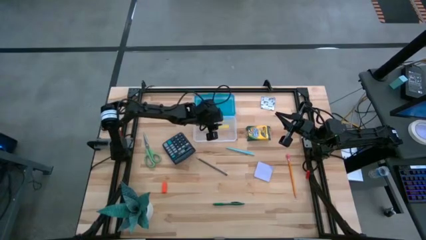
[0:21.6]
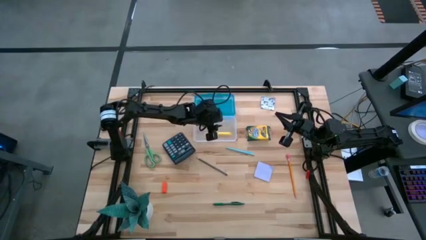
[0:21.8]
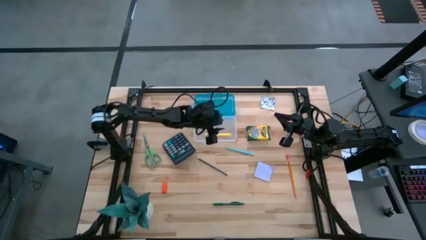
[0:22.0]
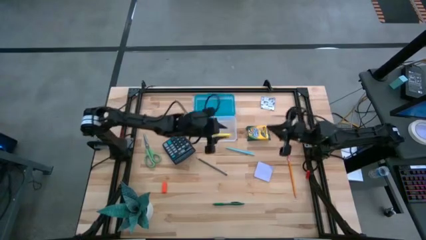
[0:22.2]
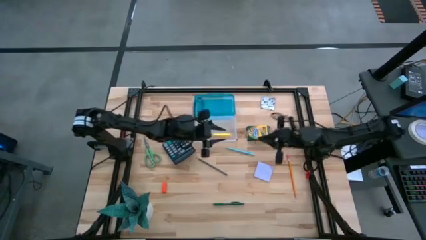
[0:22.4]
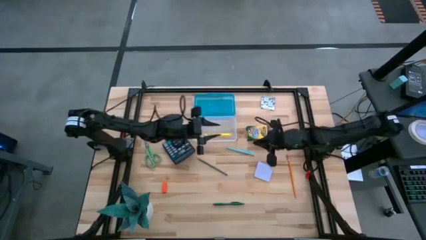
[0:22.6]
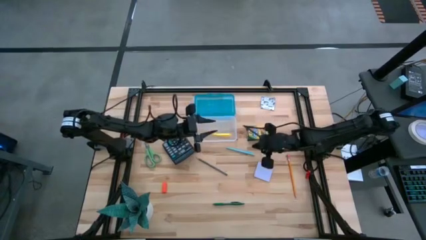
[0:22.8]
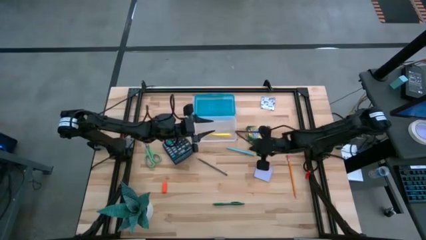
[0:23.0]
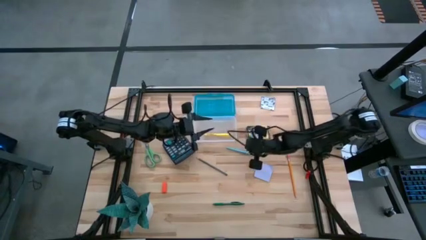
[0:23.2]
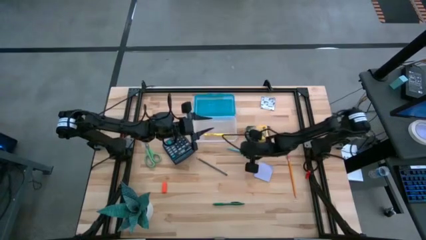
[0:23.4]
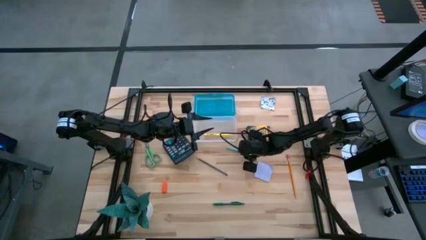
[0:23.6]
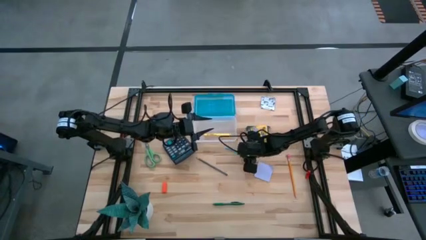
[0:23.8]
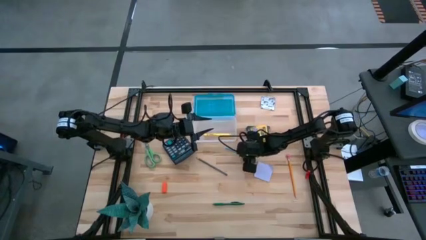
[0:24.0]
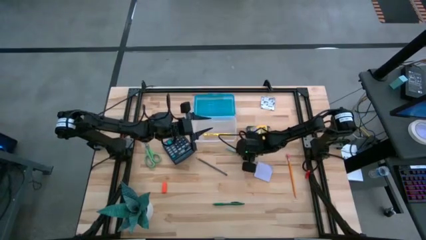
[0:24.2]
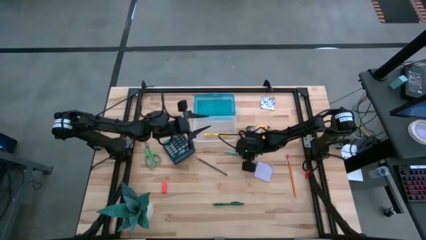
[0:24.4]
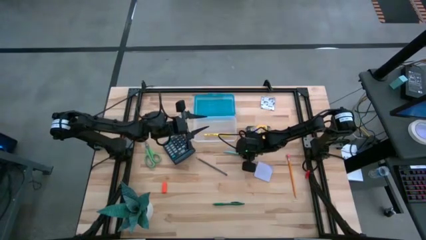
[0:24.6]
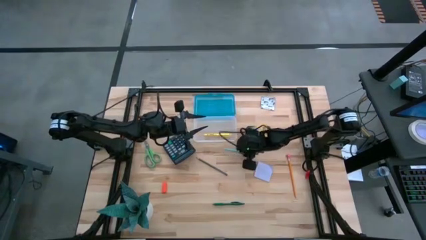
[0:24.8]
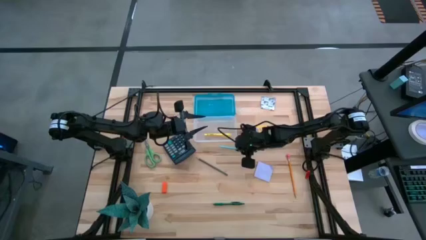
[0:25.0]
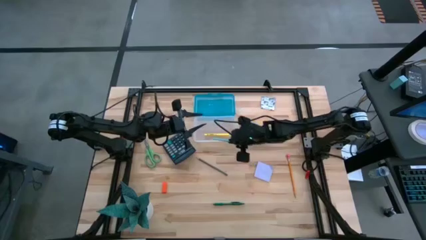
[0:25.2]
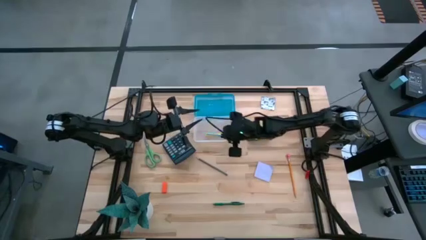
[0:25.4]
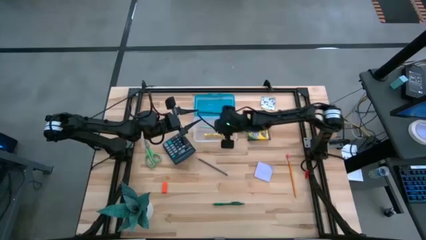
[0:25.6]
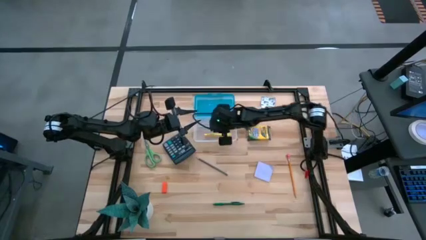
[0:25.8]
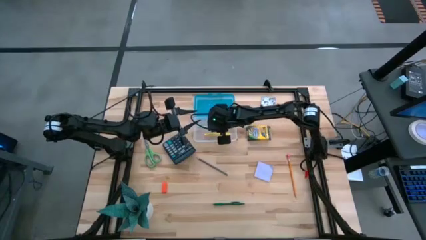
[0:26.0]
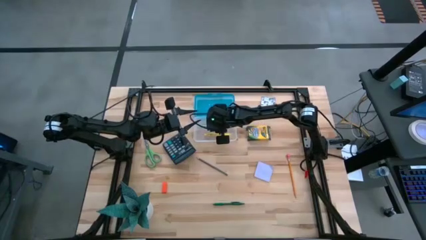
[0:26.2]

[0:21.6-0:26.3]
Task: Pack school essentials
Put the light blue pen into the blue supply box

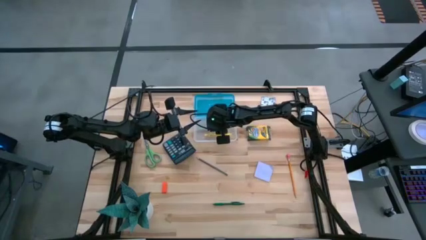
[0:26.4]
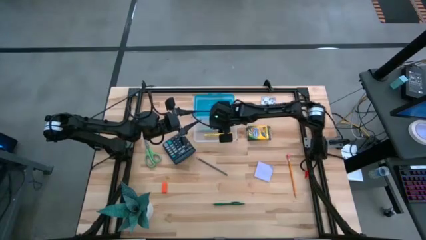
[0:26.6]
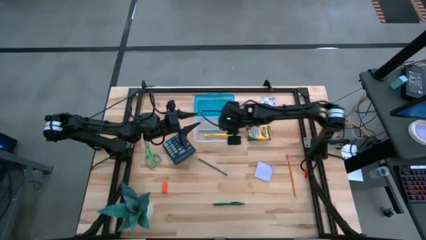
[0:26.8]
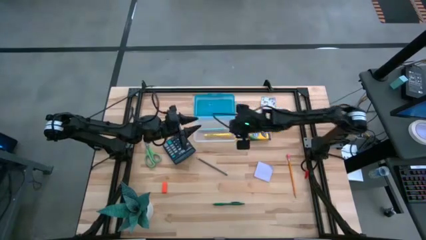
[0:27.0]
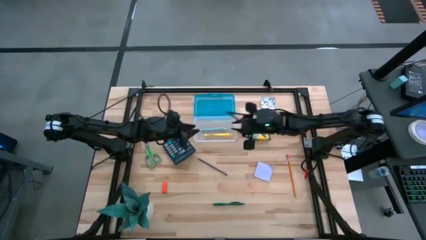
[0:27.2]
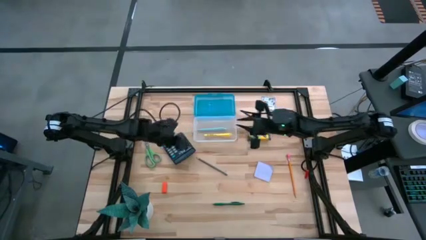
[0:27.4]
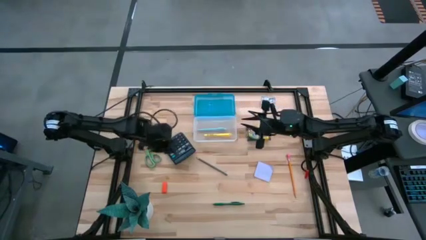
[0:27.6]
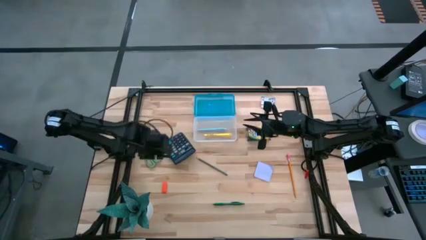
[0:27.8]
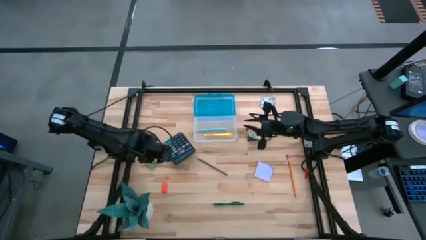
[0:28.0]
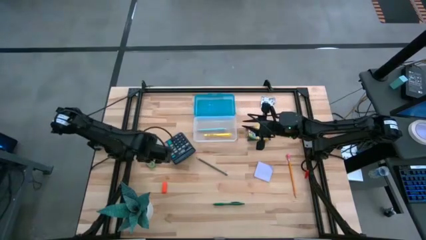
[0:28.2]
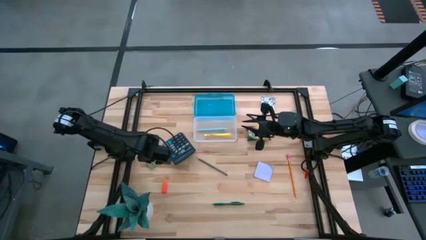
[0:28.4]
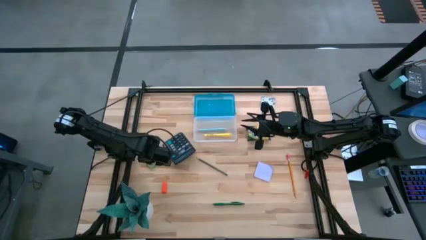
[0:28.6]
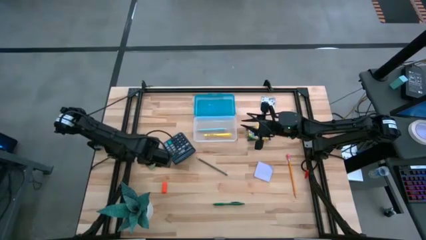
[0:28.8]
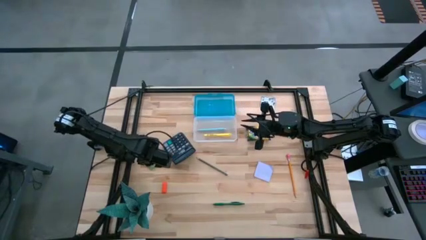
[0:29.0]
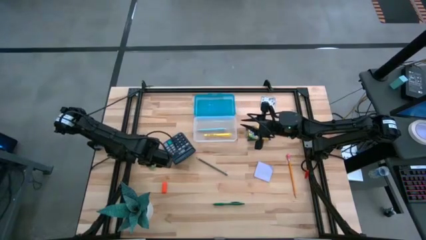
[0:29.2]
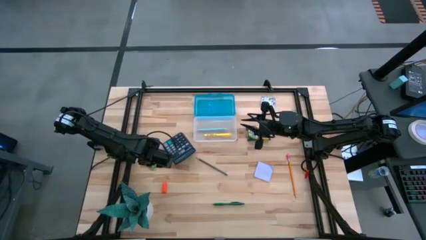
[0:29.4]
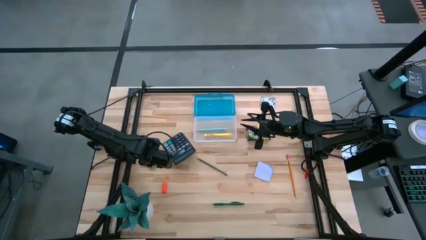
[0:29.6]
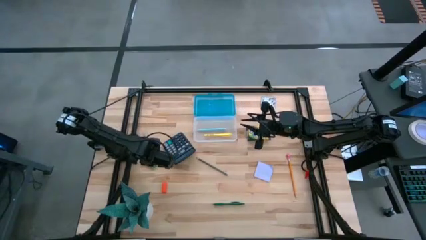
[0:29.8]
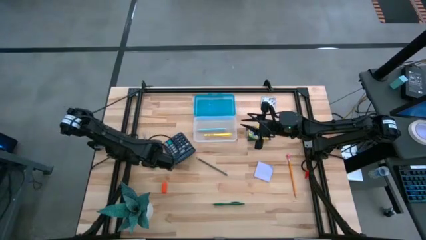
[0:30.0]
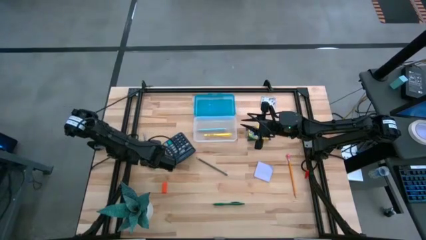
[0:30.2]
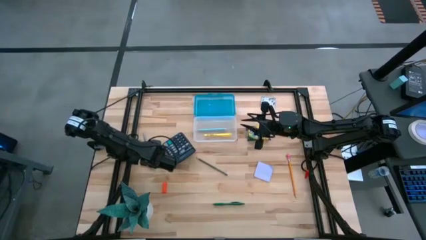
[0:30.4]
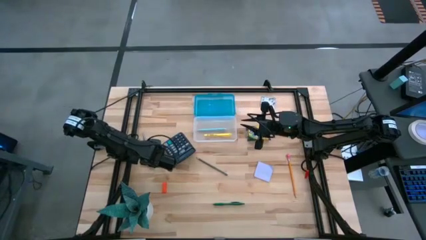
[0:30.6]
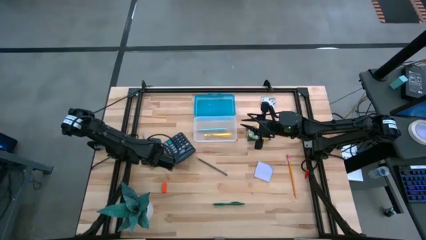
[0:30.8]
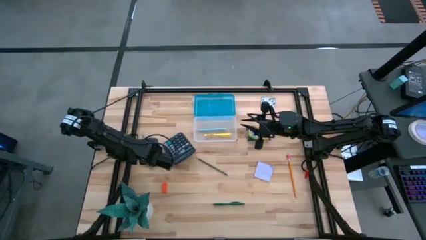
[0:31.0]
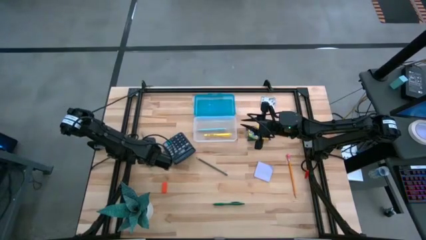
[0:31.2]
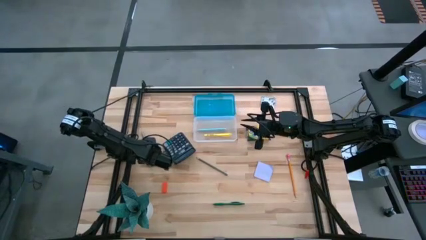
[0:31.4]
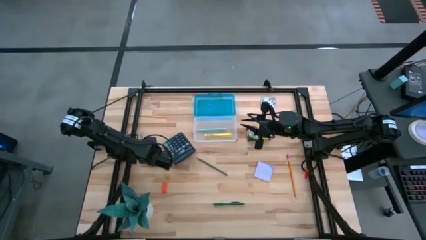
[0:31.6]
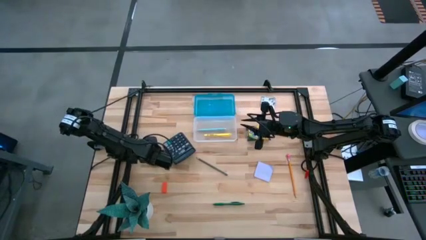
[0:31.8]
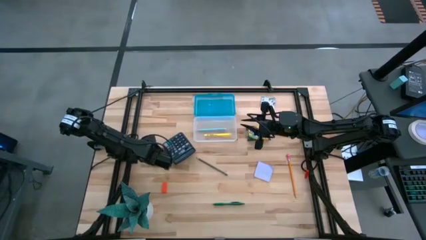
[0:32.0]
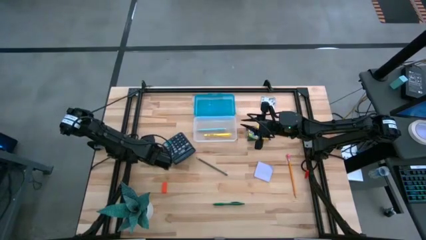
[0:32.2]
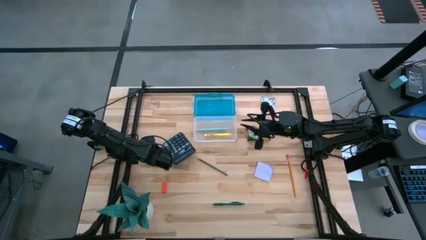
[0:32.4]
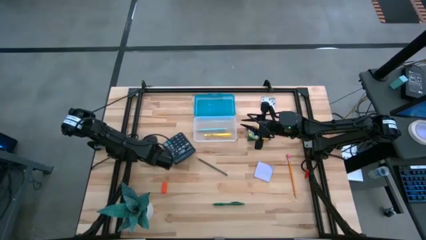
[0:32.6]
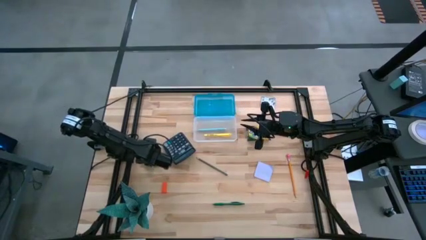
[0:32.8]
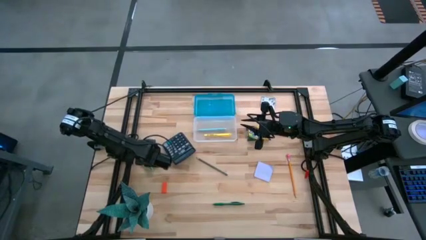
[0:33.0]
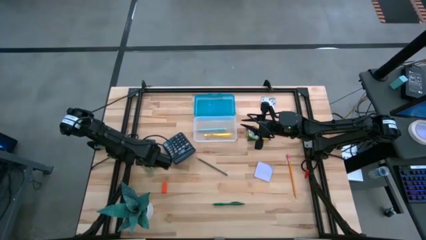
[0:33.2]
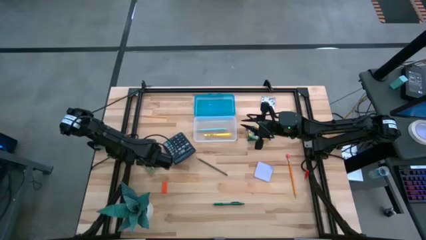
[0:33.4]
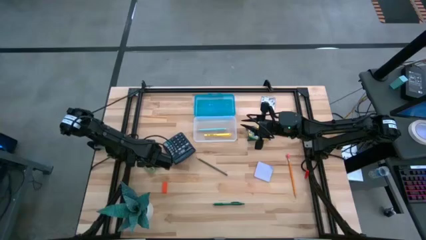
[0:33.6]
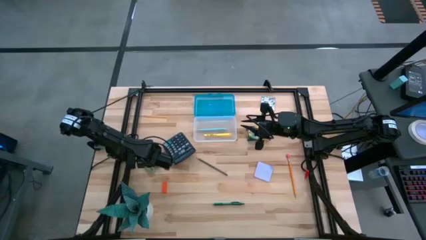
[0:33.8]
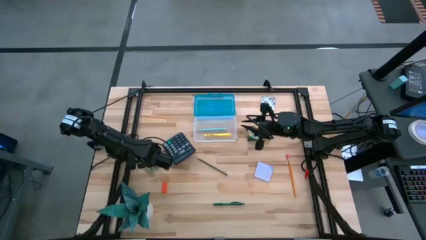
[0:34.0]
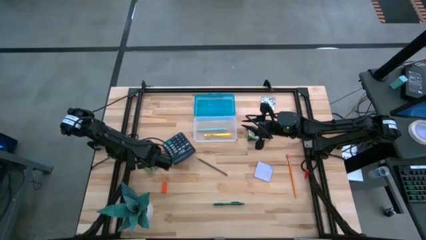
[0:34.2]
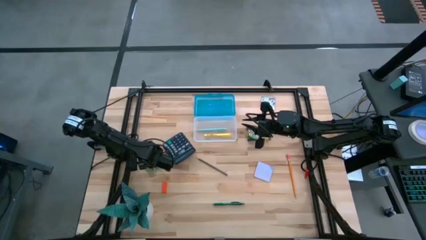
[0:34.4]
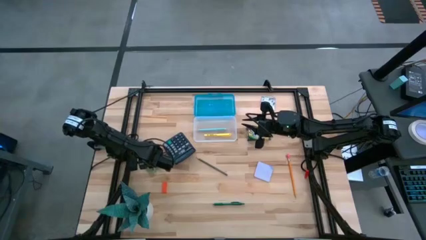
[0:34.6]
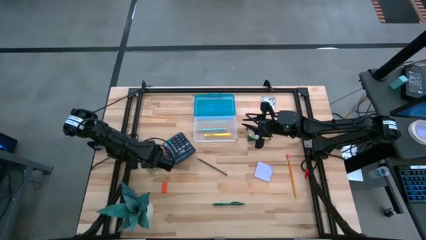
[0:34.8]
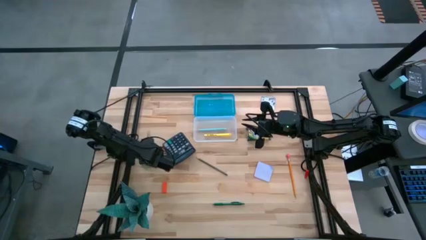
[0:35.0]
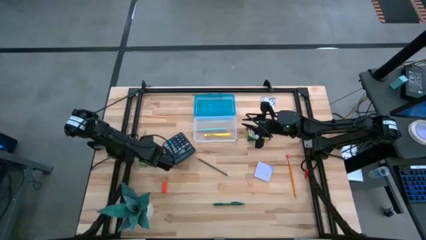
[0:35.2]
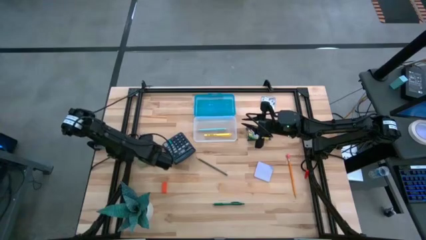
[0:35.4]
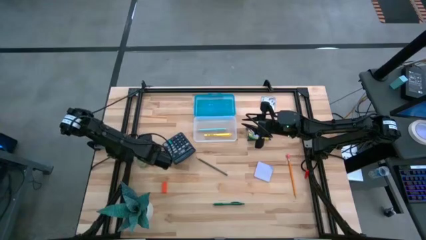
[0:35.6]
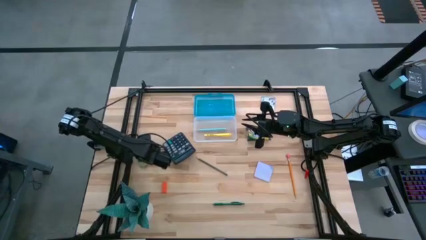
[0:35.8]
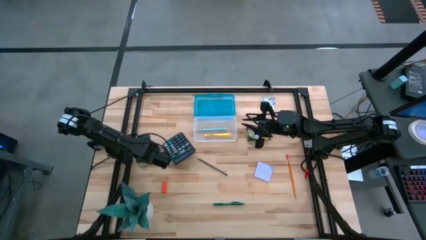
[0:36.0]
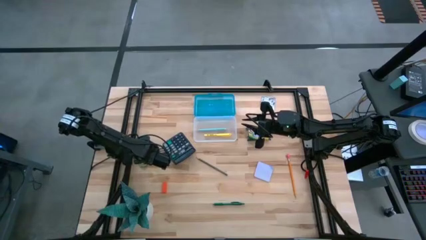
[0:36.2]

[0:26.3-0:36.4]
Put the green scissors into the blue supply box

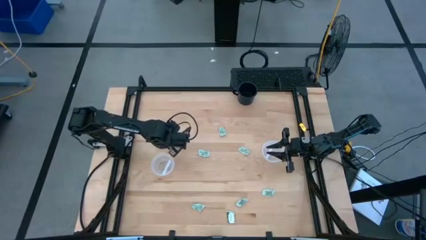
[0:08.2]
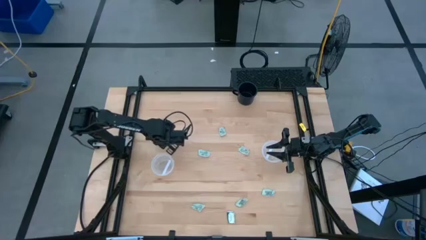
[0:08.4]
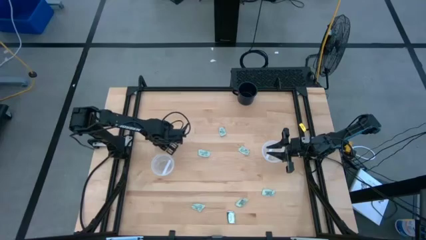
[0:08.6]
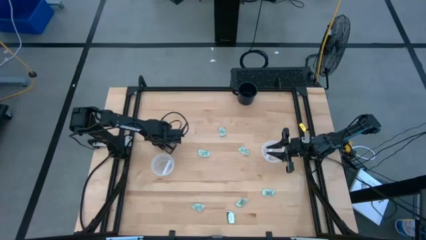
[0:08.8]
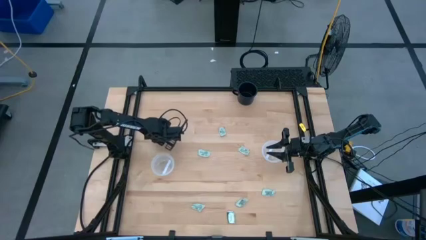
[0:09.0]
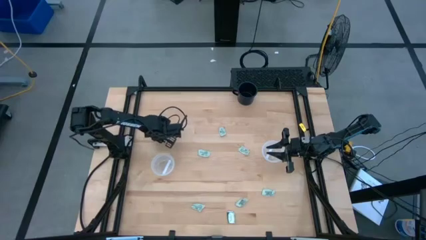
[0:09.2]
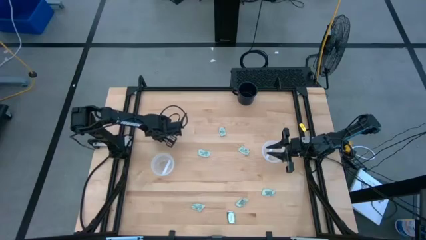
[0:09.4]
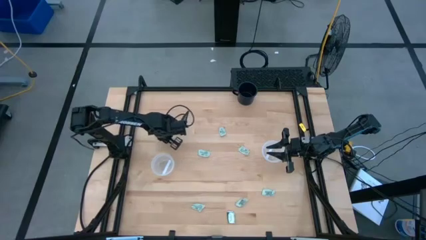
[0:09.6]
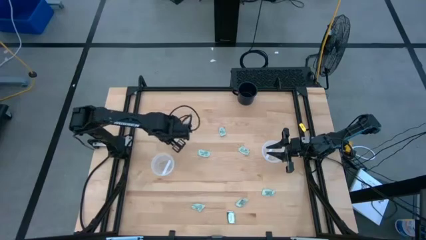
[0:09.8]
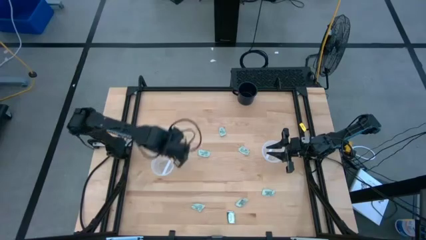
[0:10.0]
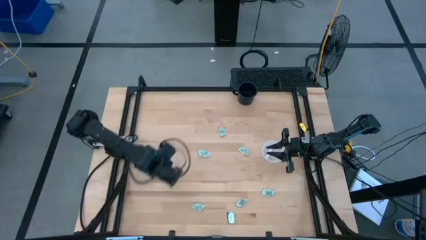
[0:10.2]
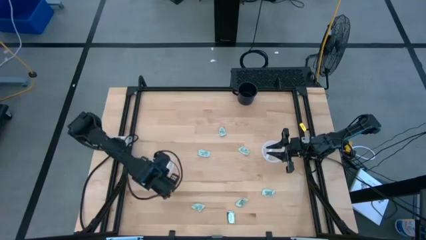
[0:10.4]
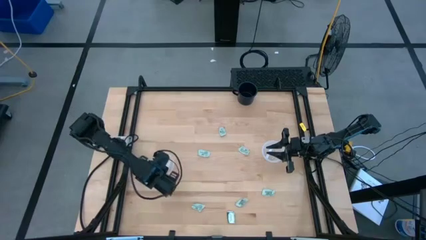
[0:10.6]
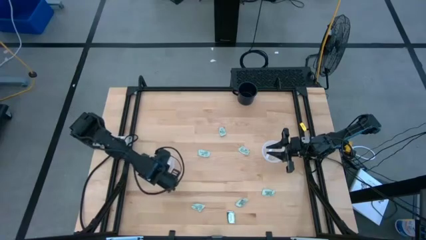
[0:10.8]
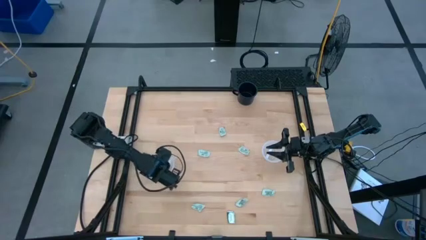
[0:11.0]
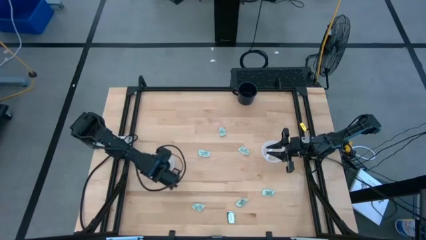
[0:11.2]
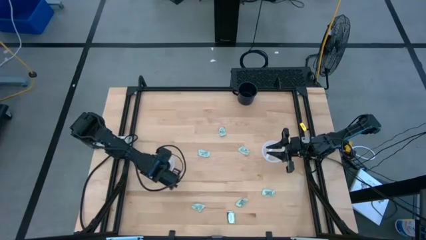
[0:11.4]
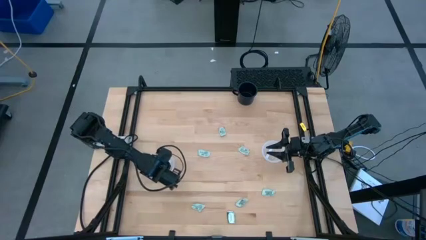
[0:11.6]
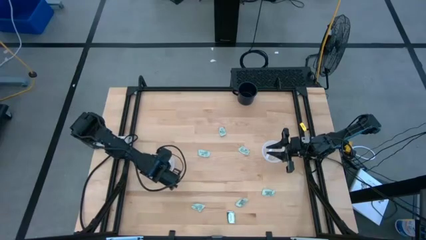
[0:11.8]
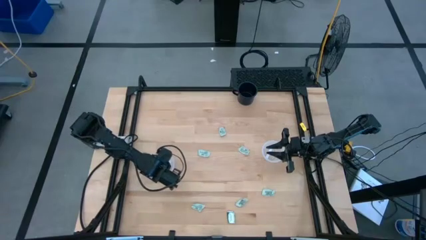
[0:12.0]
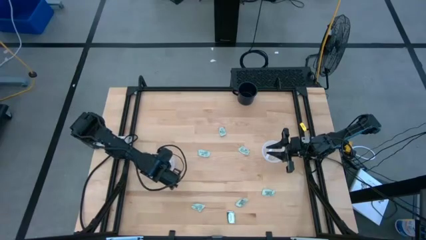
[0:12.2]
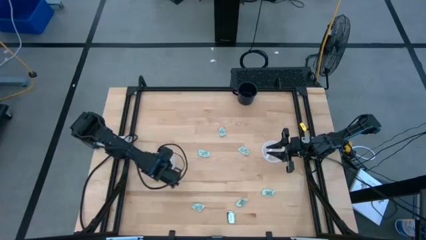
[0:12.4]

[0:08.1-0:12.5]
Task: Pick and place items into bin
Put the stevia packet into the left transparent bin
